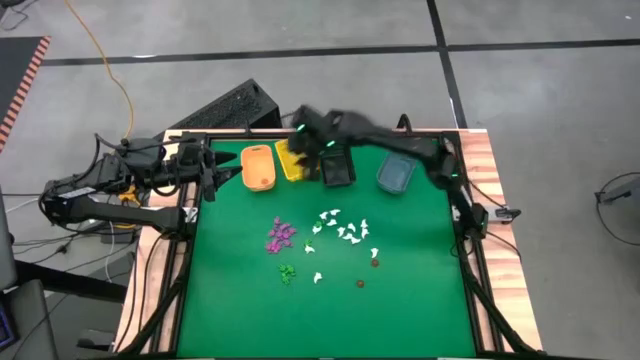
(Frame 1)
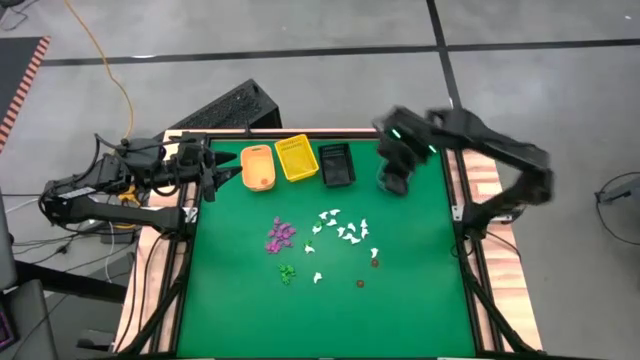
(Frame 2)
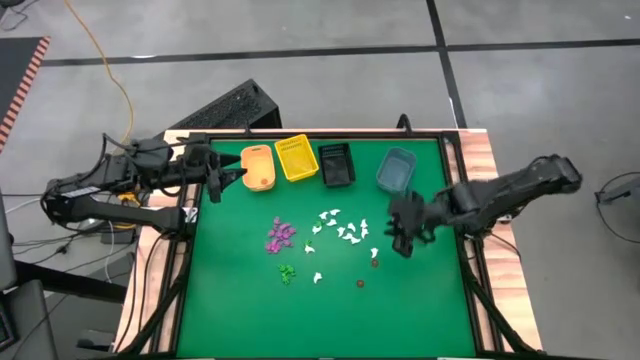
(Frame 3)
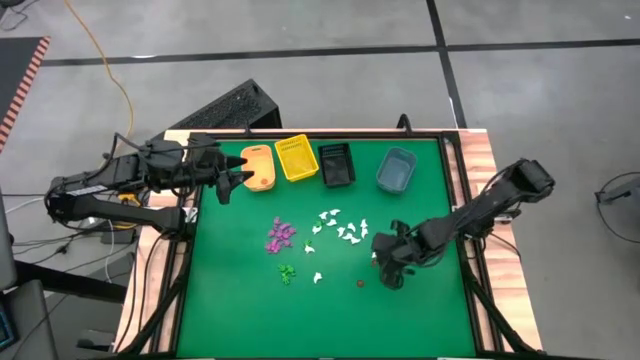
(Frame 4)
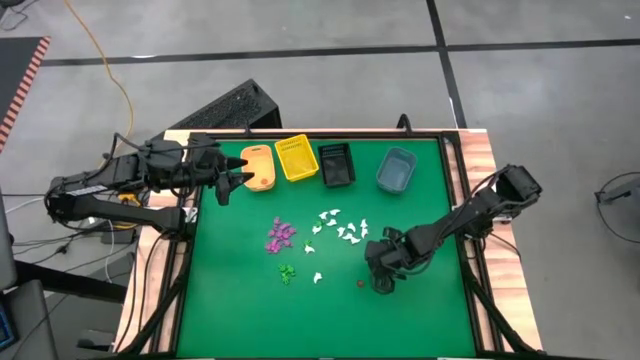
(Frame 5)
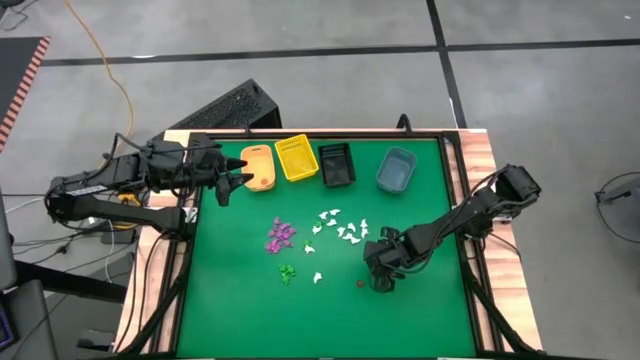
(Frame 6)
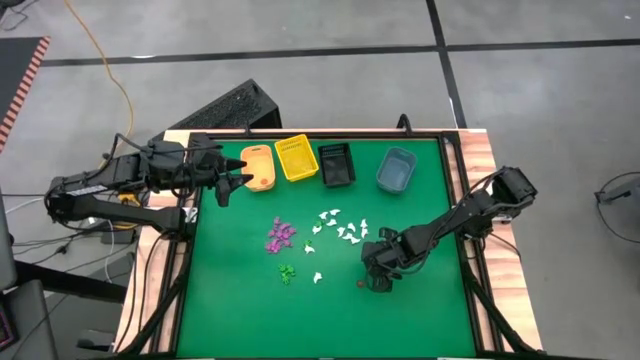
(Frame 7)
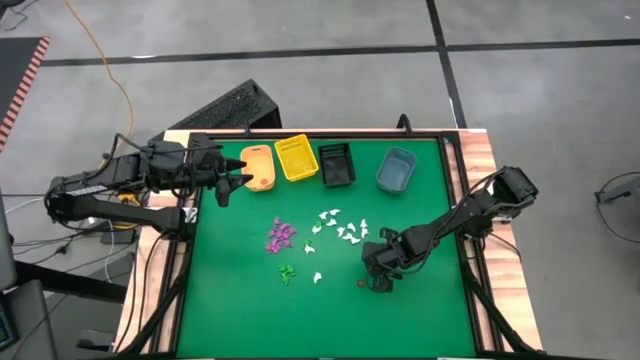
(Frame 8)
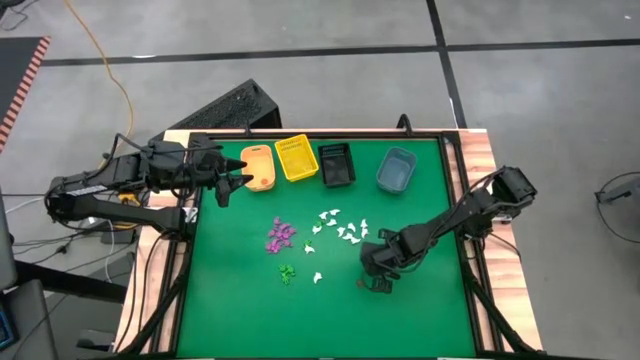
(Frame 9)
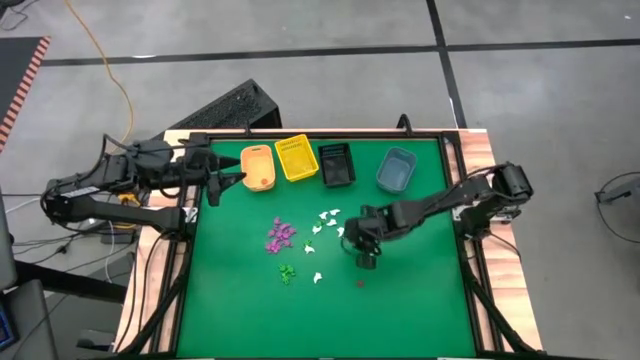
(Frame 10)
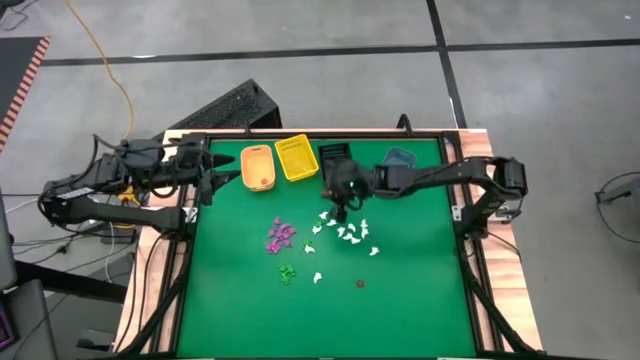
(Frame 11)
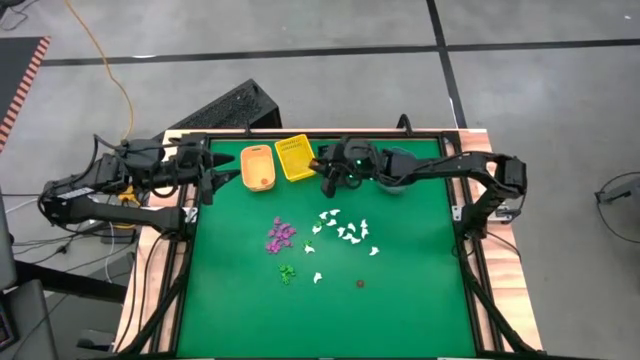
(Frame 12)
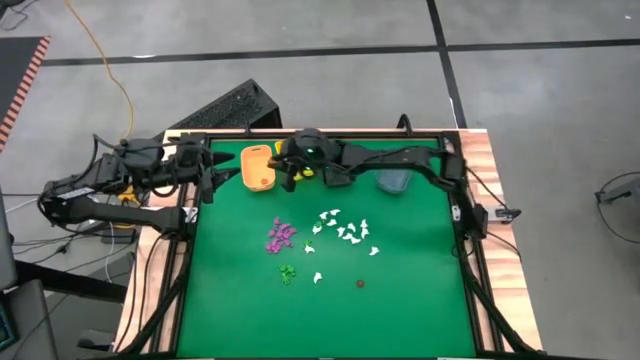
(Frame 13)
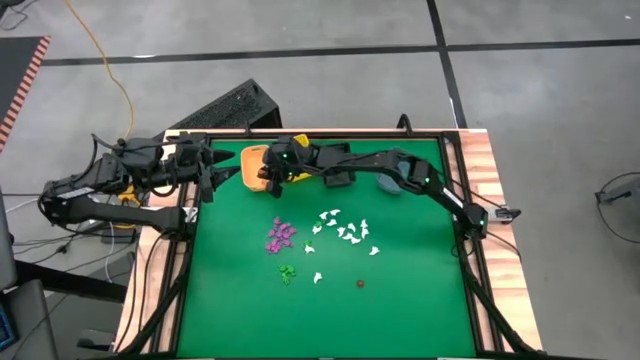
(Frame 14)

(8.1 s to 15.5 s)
Task: Sort Halloween decoration
Put the orange pumpkin toy into the orange bin

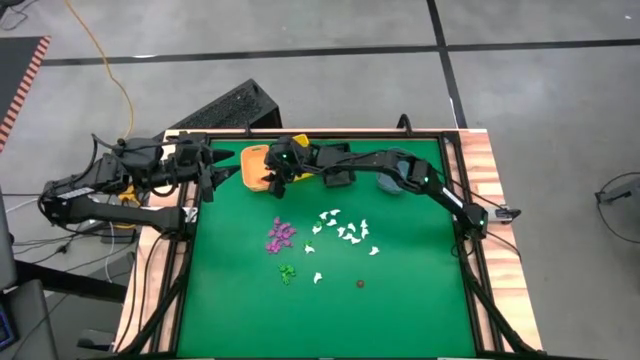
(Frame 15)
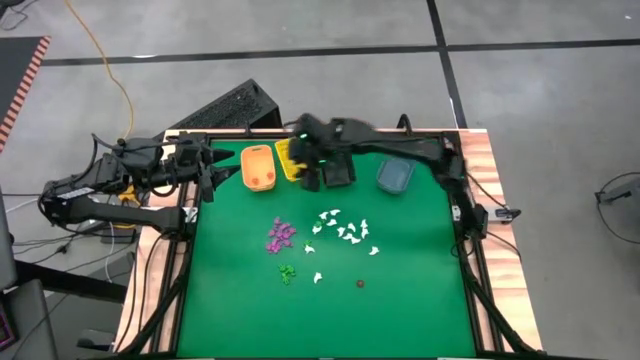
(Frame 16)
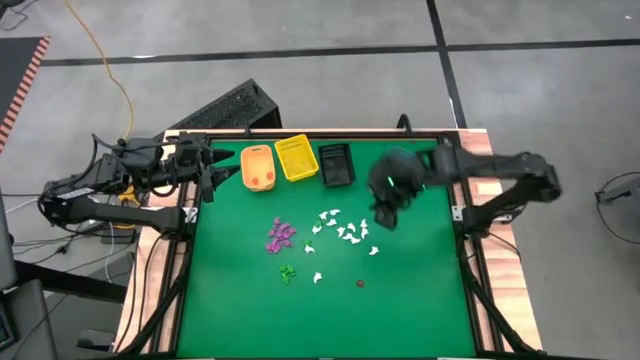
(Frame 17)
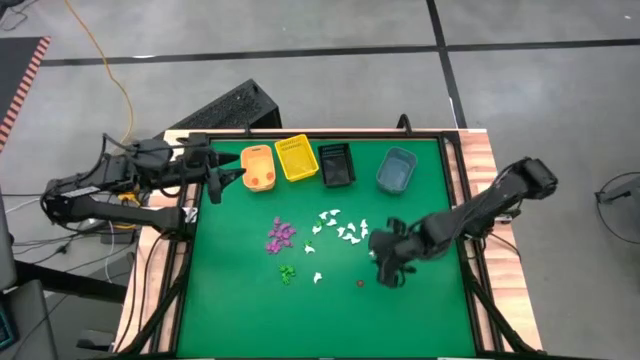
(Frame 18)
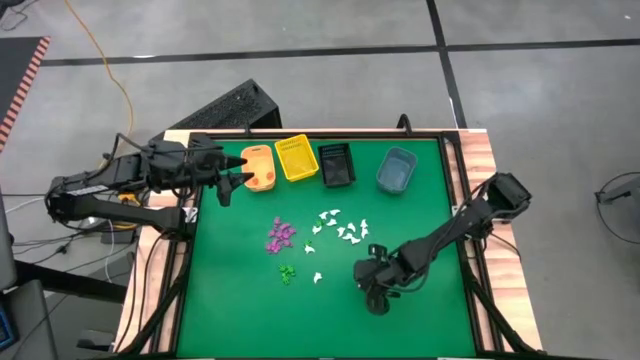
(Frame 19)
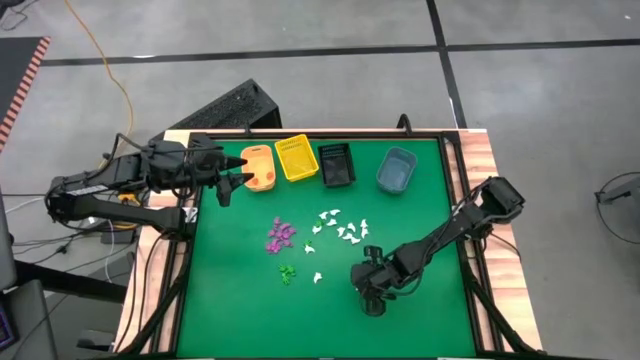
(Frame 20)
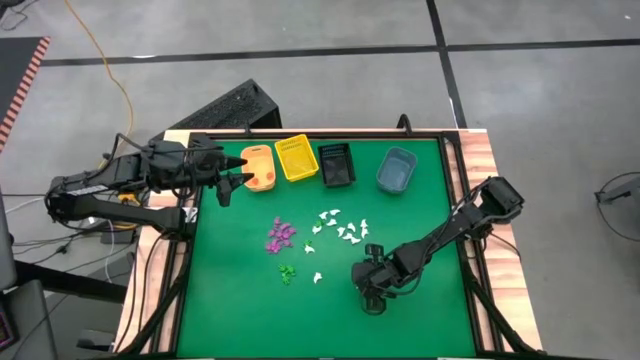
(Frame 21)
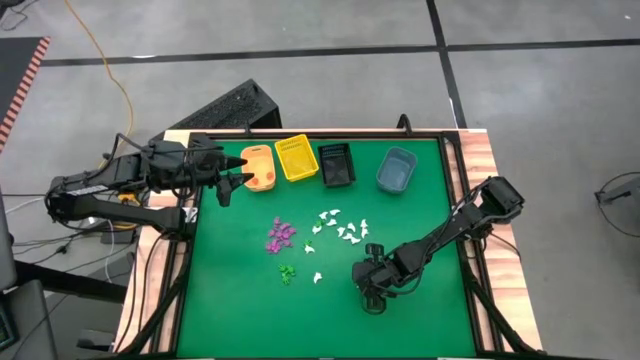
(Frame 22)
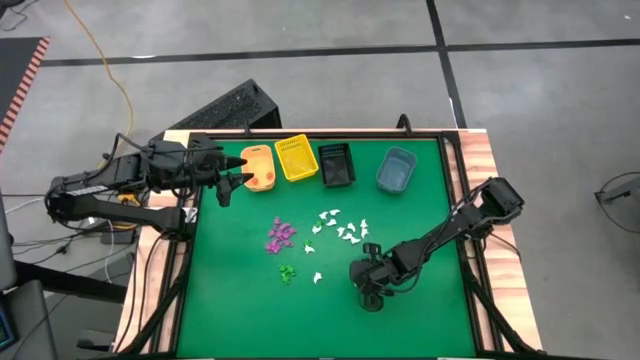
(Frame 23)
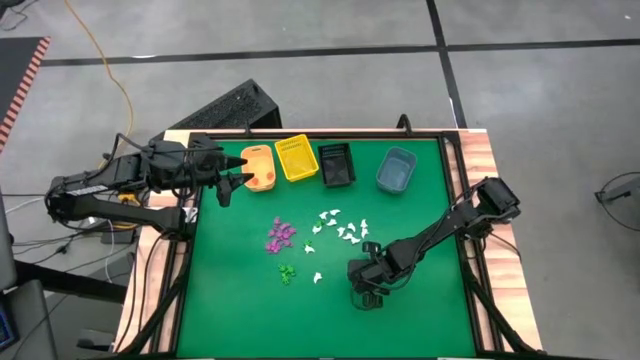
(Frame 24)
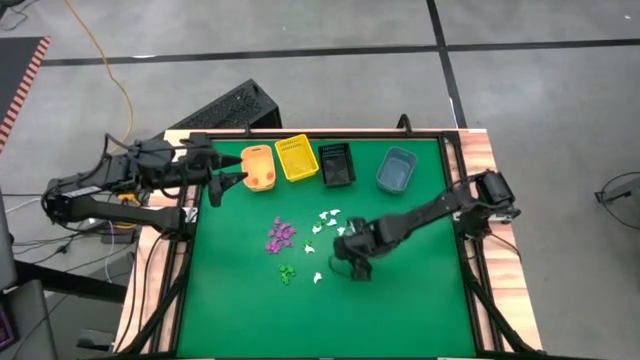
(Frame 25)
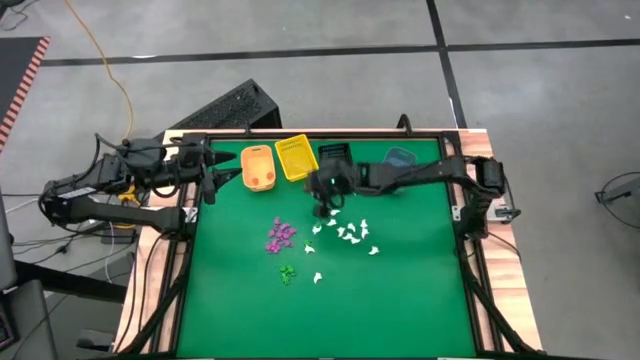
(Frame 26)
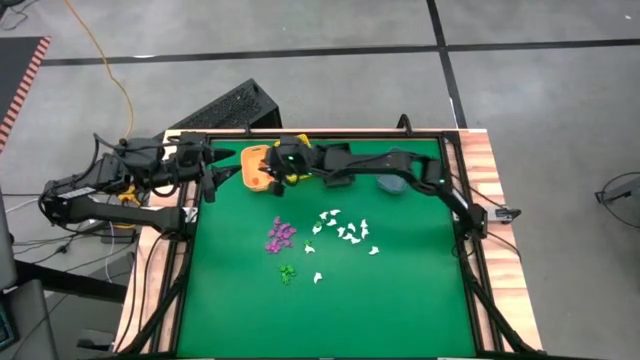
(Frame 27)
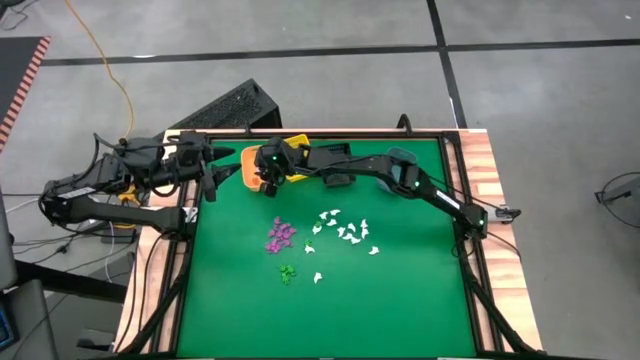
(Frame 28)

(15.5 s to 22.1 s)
Put the orange pumpkin toy into the orange bin

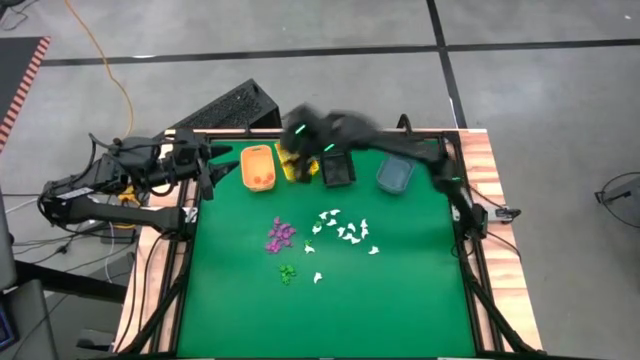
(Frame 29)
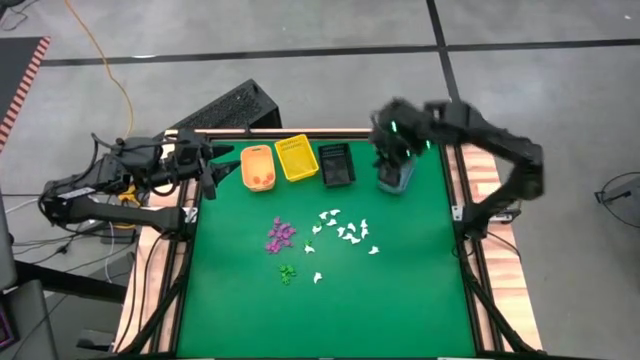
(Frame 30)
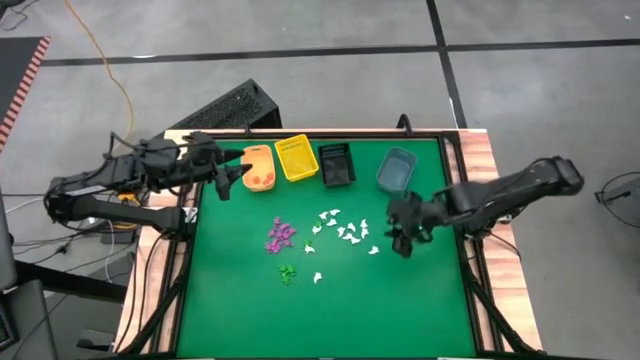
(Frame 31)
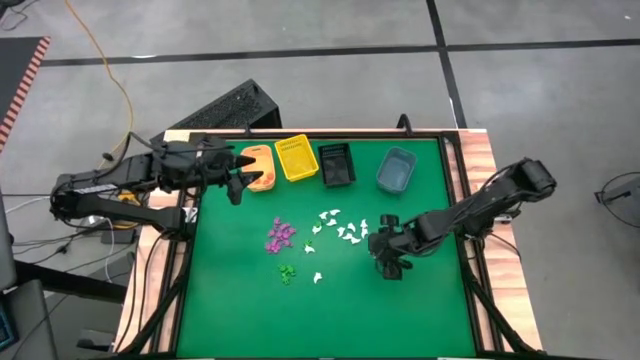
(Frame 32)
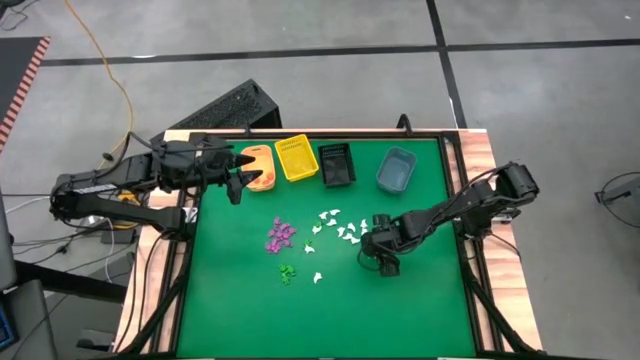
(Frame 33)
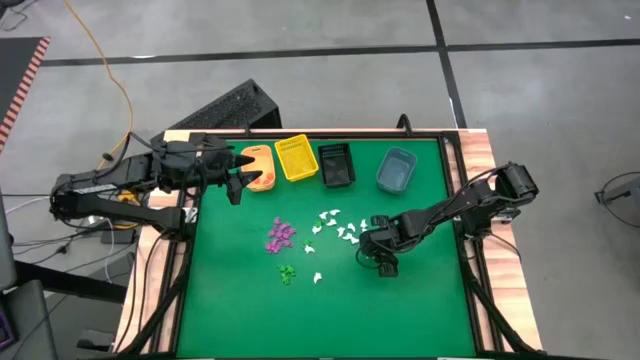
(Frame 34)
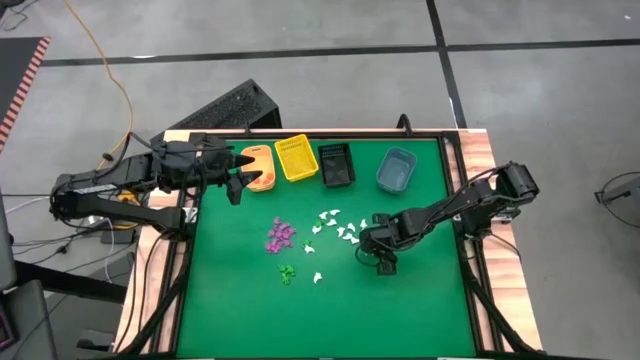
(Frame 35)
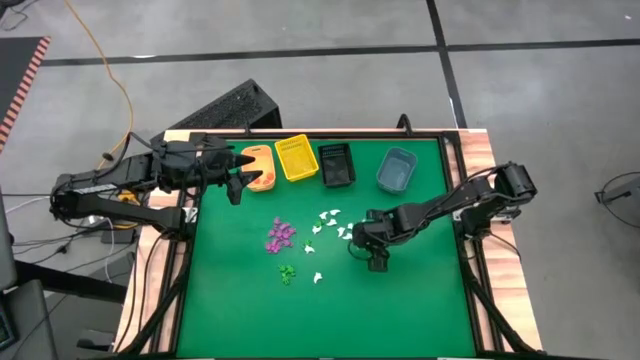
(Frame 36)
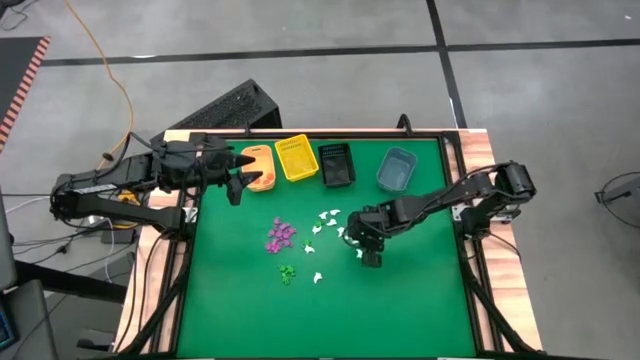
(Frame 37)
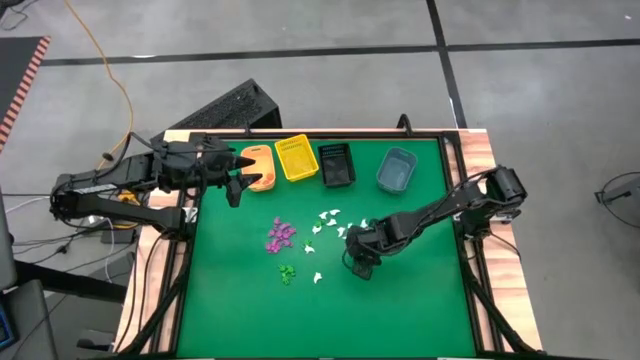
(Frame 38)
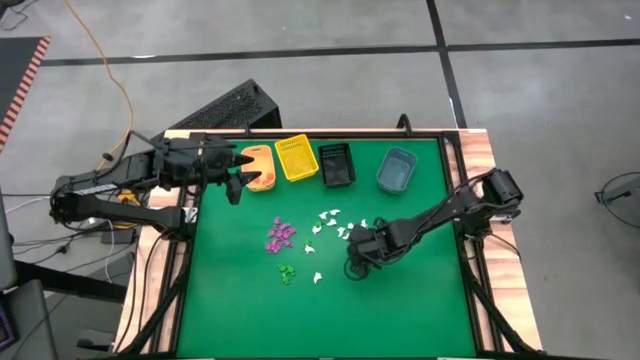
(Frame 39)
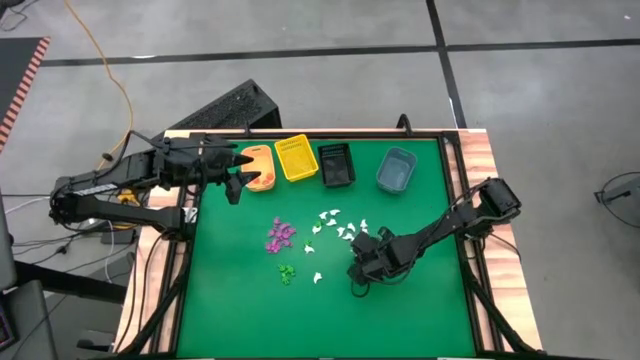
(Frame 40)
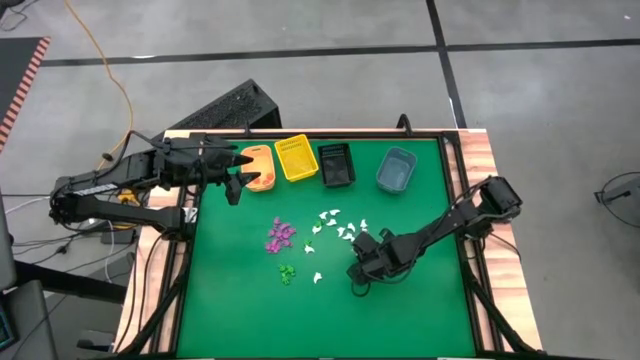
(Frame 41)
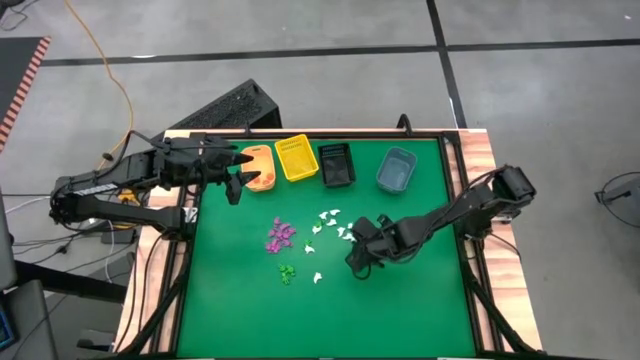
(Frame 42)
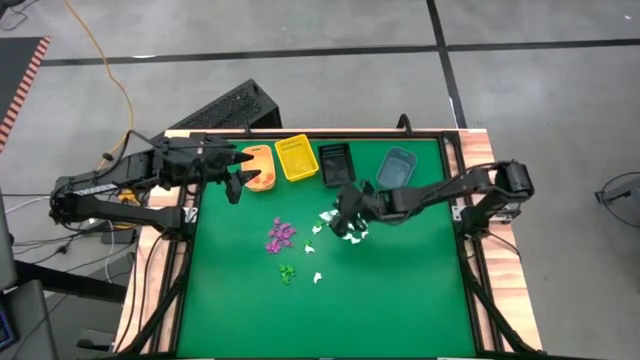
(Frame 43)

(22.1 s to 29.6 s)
Put the white ghost toy into the black bin
